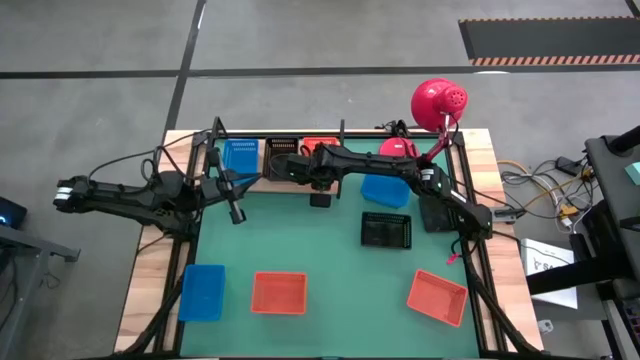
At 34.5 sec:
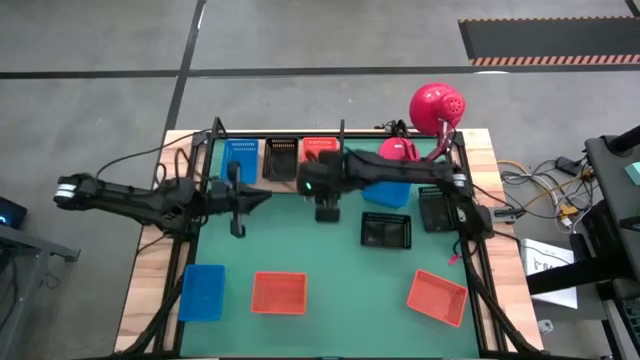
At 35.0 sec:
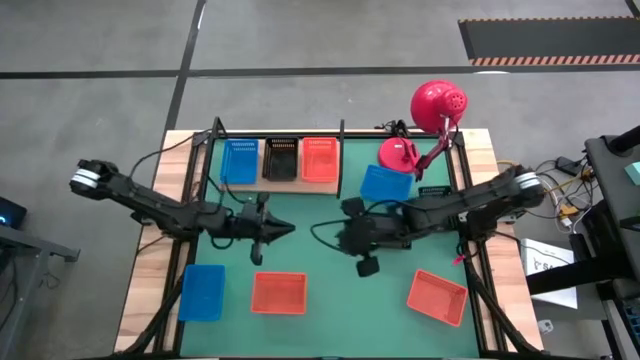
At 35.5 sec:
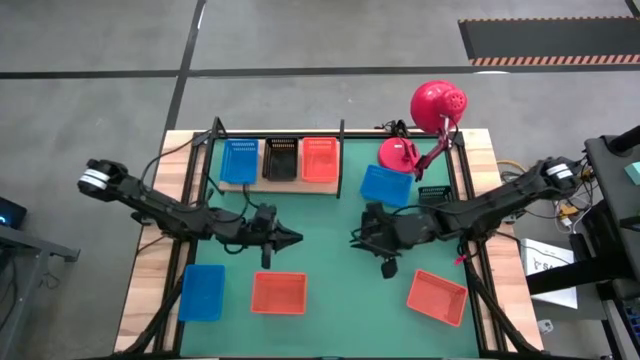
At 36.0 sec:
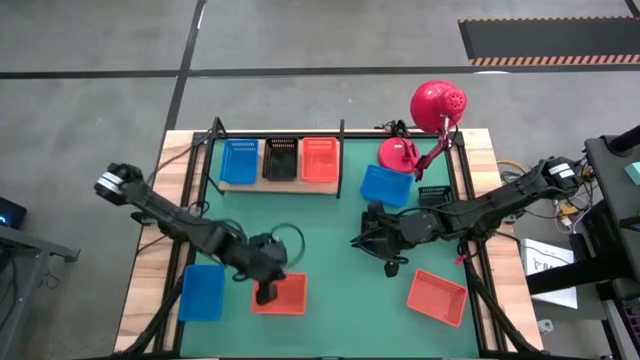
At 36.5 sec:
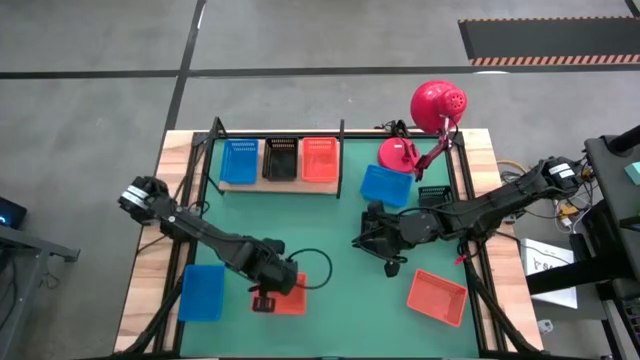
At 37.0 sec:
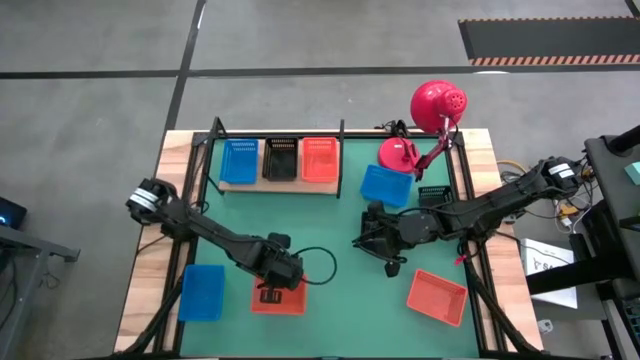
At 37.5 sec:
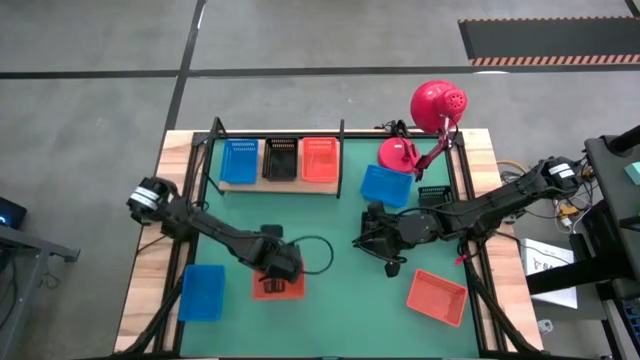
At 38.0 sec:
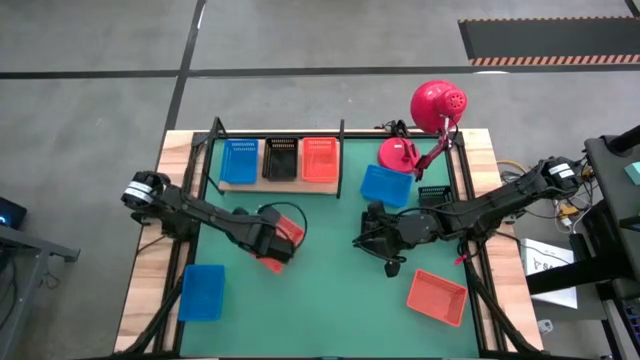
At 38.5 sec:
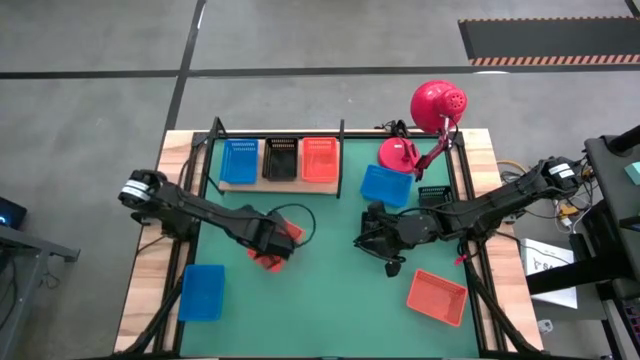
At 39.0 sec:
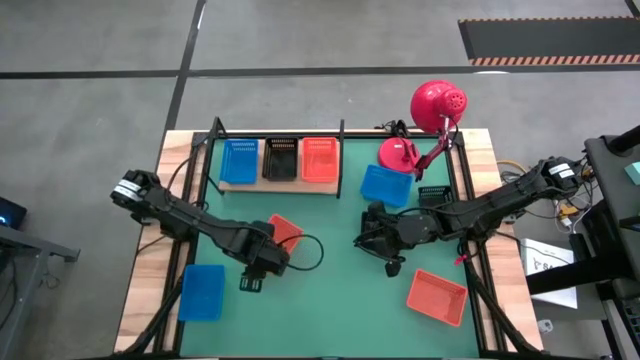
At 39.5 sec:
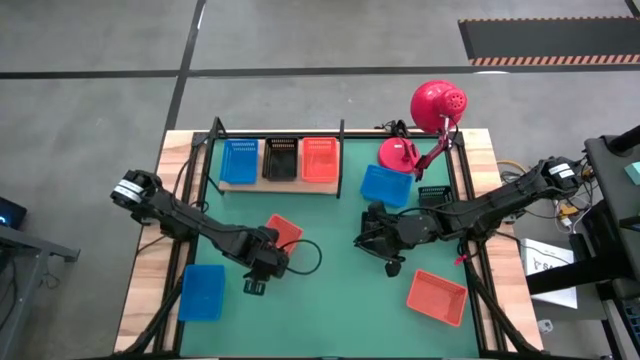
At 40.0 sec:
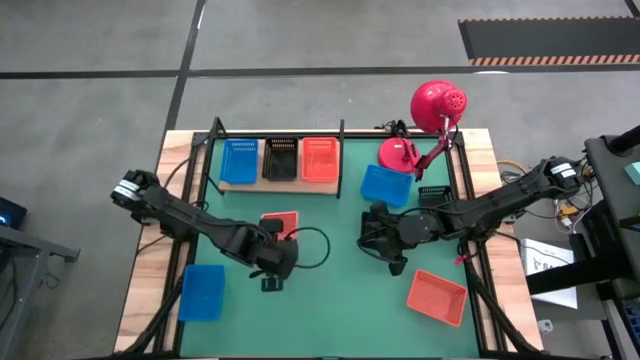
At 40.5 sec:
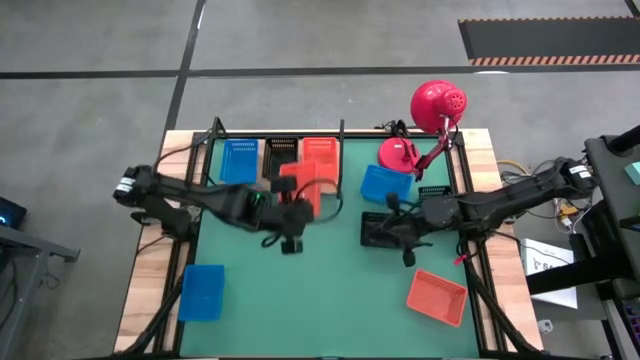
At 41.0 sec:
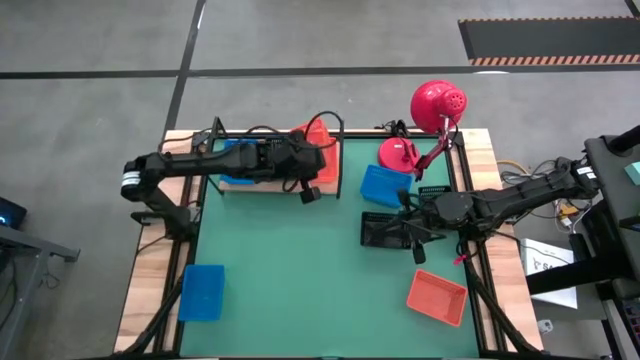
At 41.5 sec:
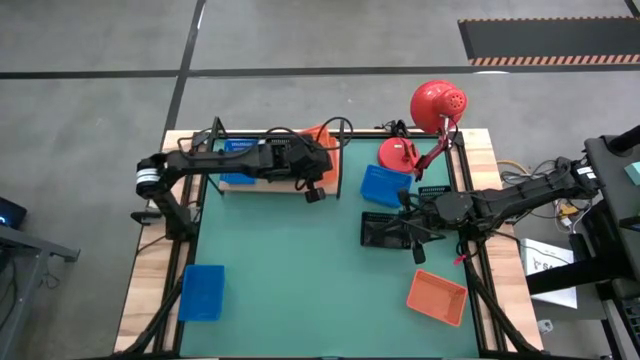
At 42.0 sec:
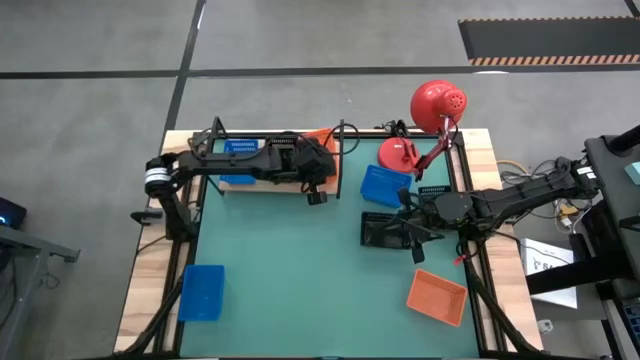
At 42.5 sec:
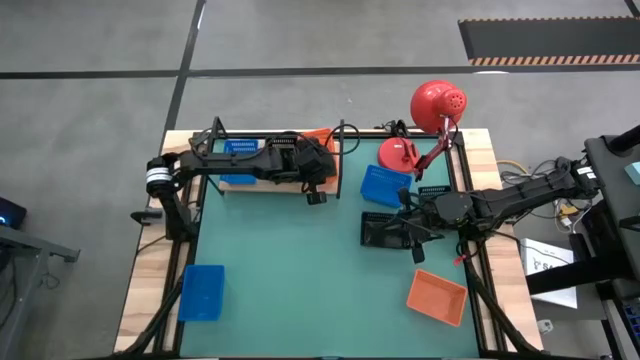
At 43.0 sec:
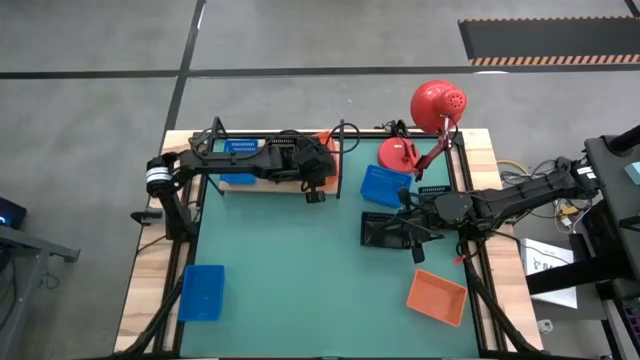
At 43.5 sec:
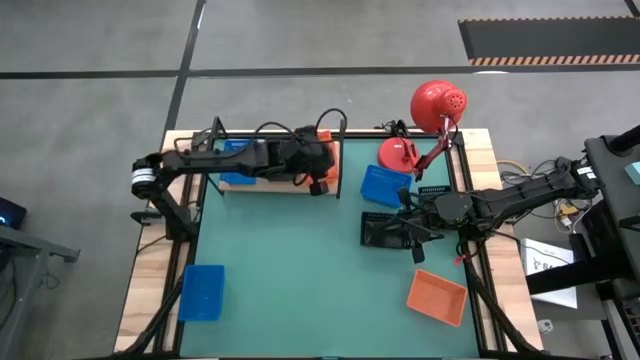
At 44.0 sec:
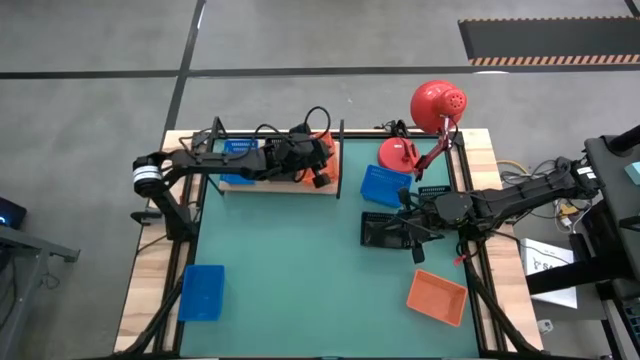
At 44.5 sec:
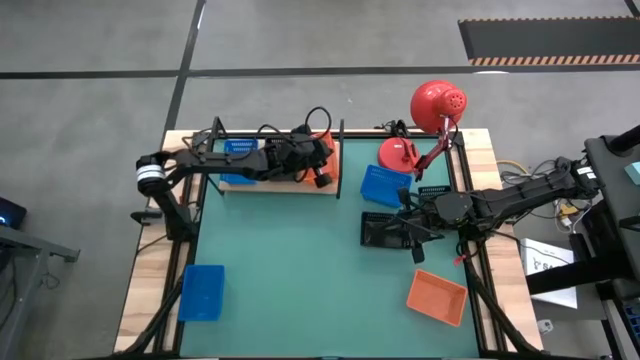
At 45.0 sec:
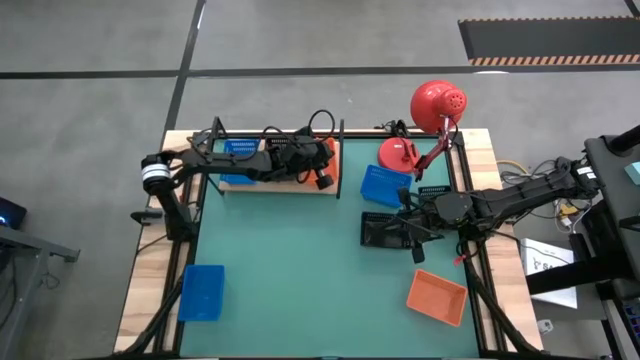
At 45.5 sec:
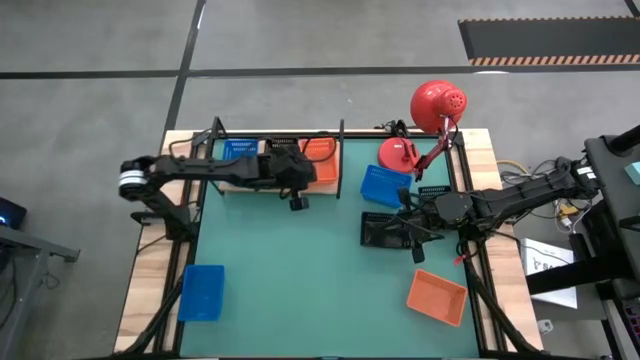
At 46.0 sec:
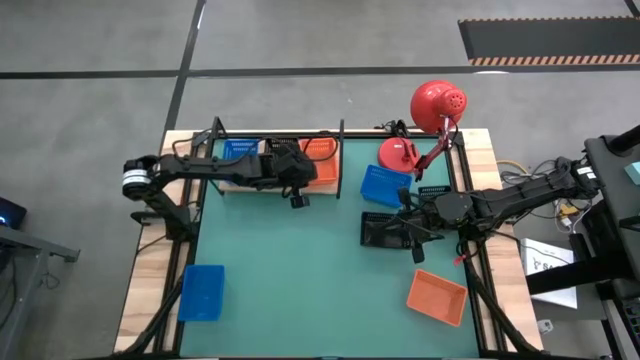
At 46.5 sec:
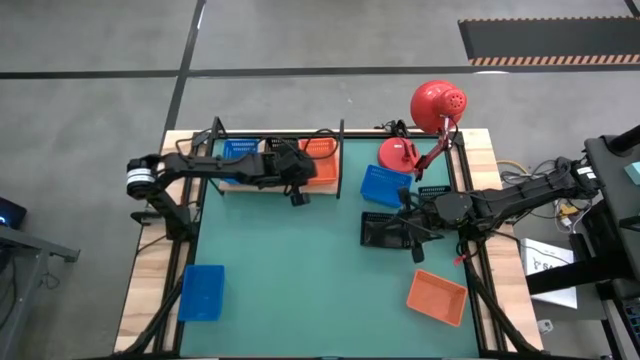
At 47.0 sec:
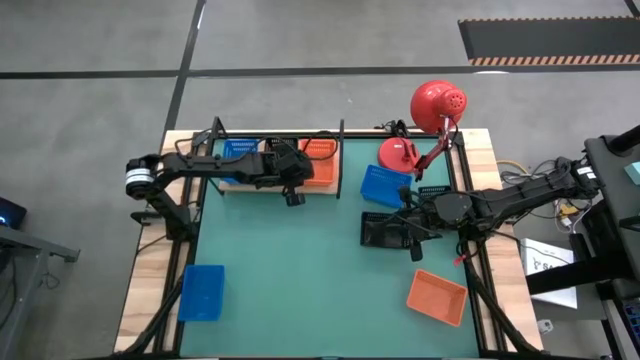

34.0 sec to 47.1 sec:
Task: Stack baskets on shelf by color
Stack the left orange bin on top of the orange bin on the shelf

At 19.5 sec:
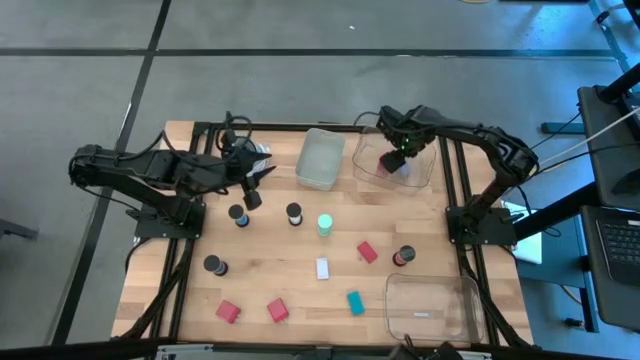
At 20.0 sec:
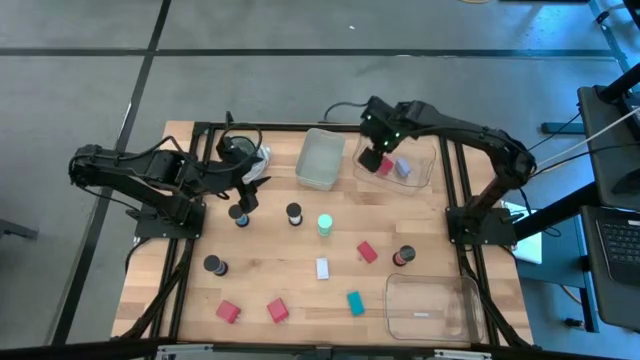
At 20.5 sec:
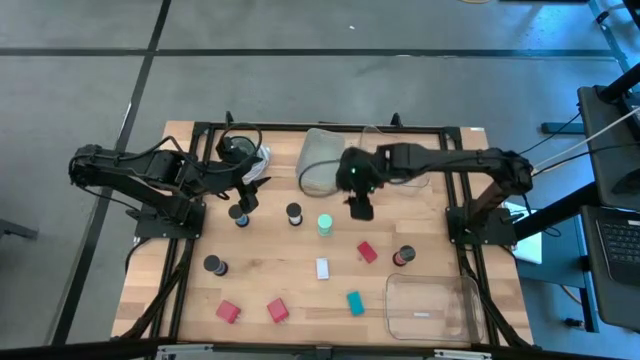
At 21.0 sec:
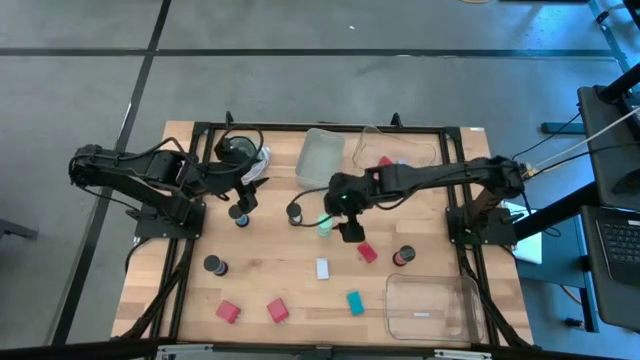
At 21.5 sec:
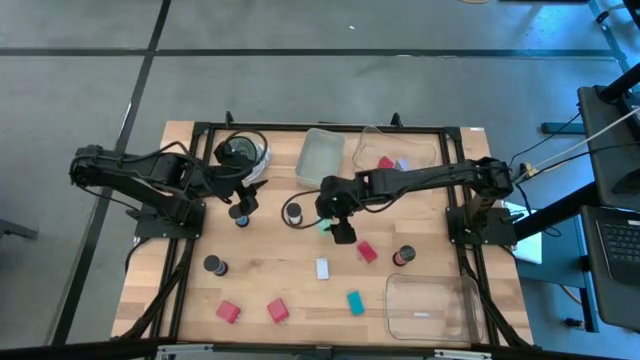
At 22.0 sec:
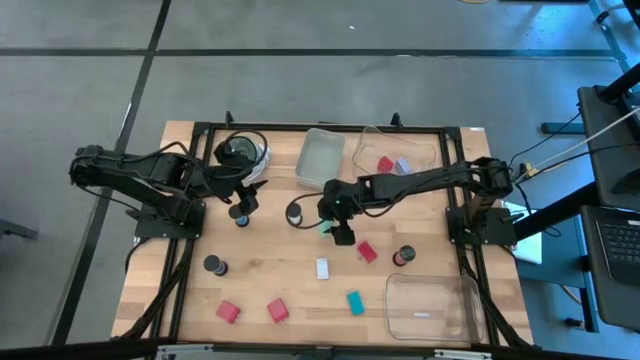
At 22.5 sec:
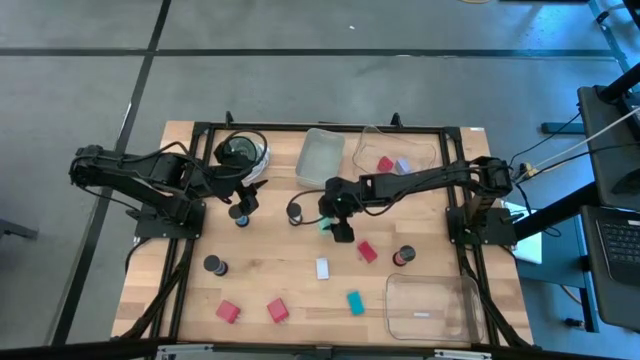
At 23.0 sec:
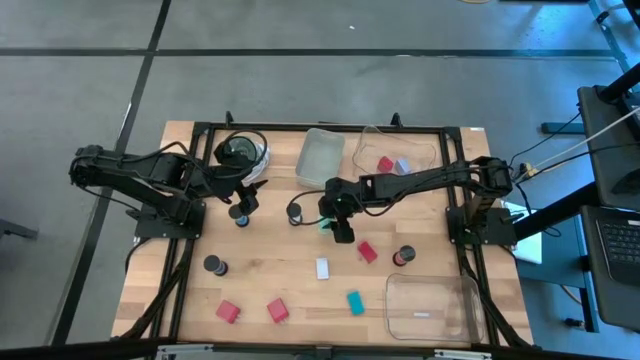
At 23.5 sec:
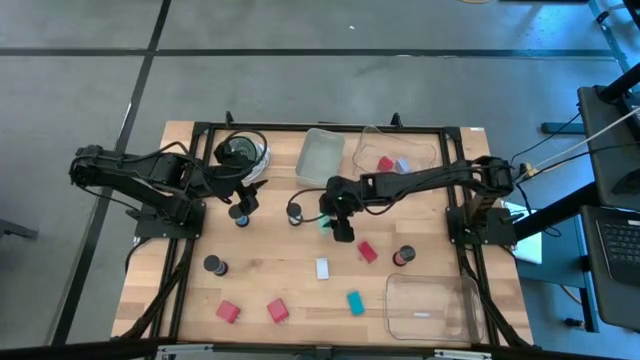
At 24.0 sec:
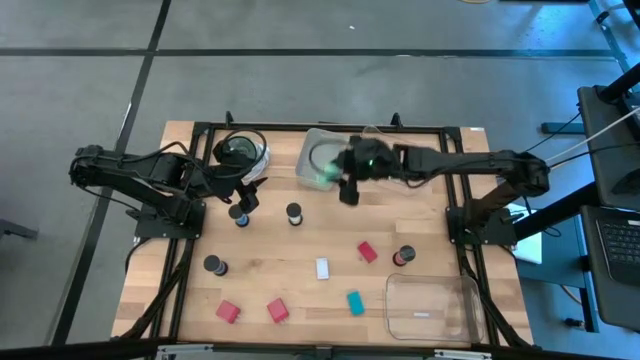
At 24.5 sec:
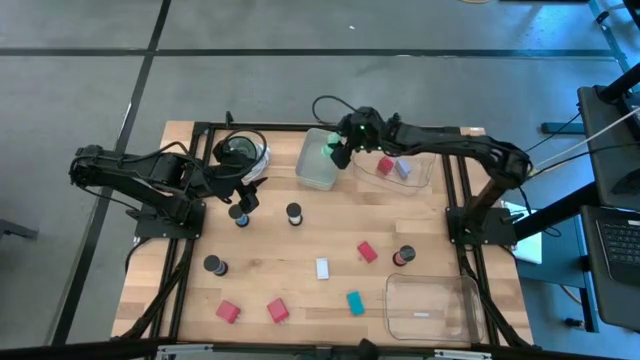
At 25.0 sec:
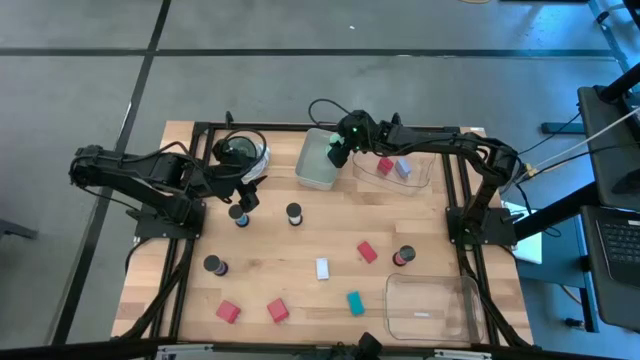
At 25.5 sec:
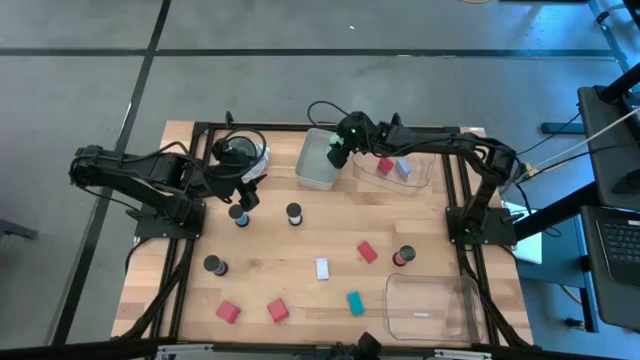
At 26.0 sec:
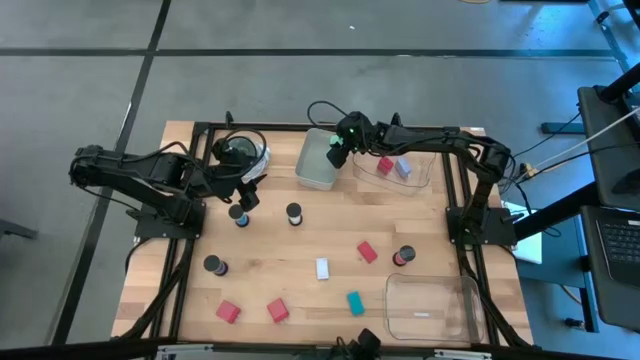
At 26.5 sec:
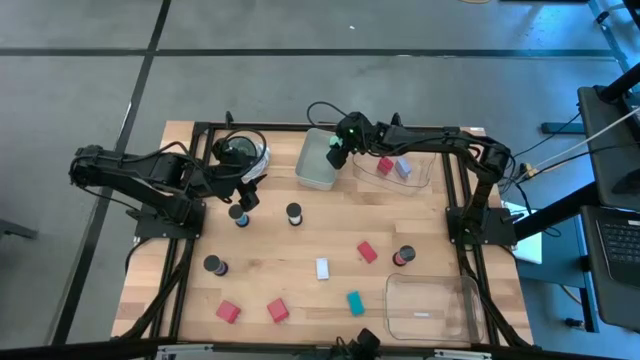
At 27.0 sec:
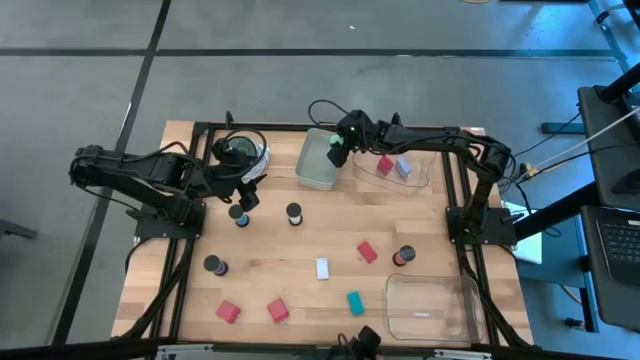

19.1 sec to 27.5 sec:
Task: Pick & Place Office items
Put the green hourglass into the gray bin
